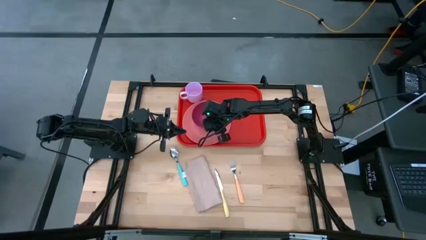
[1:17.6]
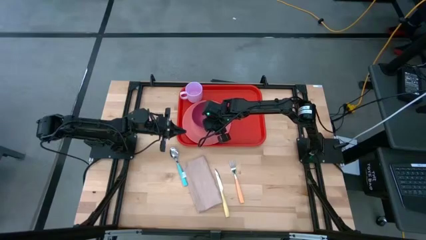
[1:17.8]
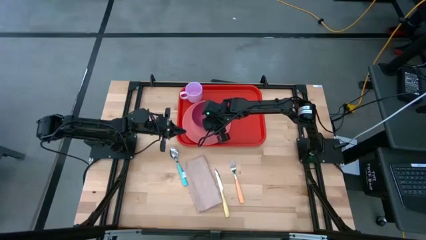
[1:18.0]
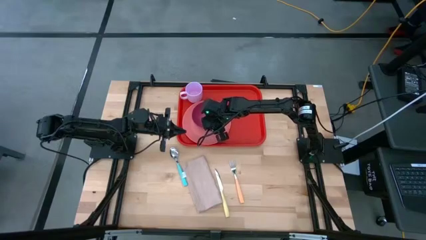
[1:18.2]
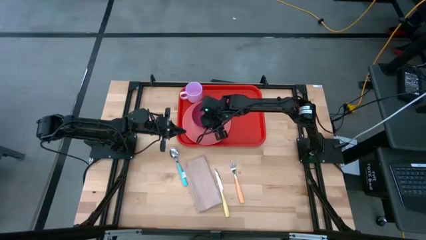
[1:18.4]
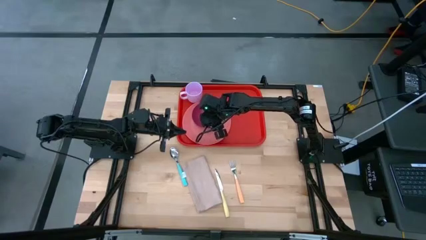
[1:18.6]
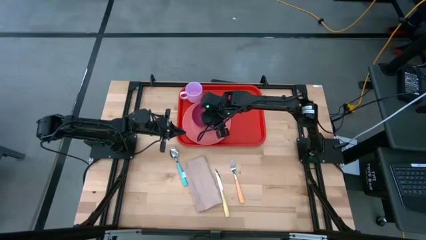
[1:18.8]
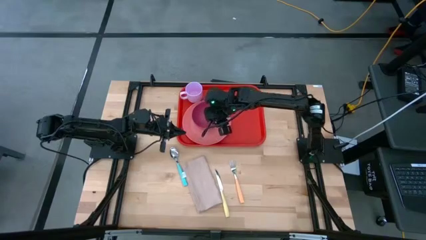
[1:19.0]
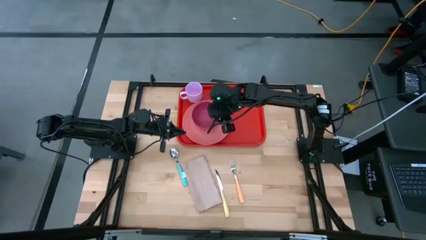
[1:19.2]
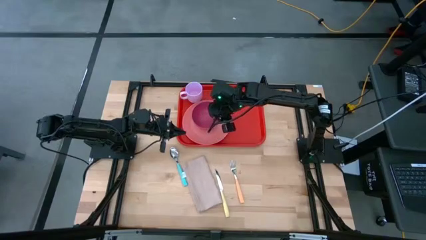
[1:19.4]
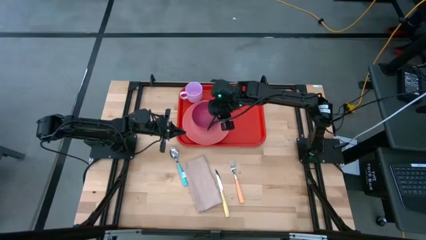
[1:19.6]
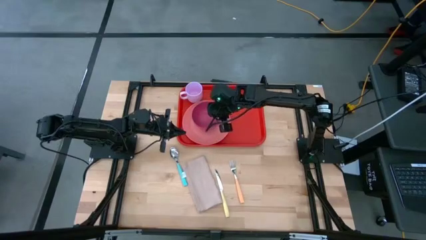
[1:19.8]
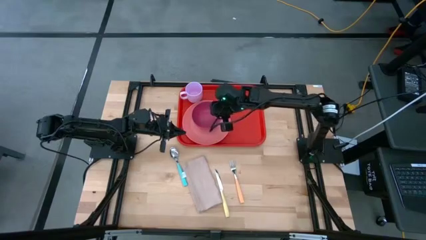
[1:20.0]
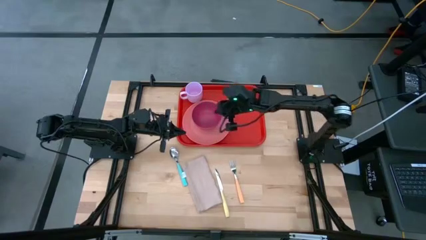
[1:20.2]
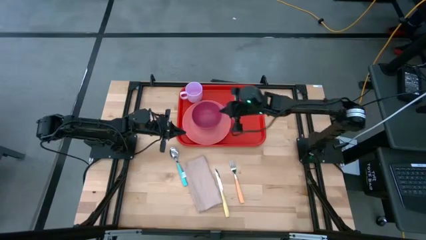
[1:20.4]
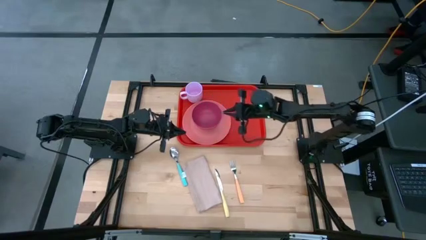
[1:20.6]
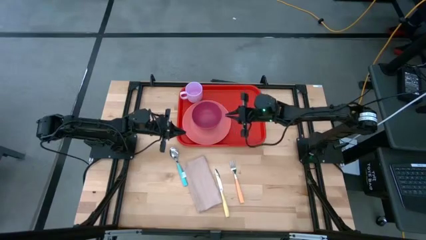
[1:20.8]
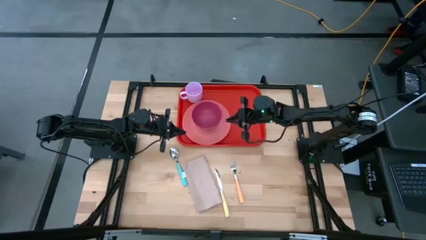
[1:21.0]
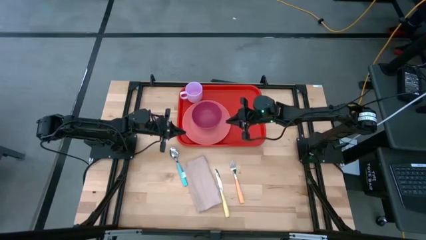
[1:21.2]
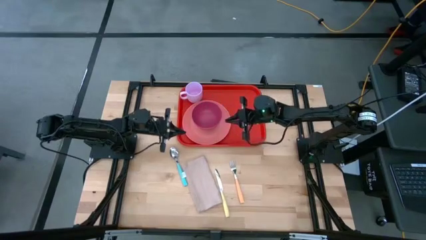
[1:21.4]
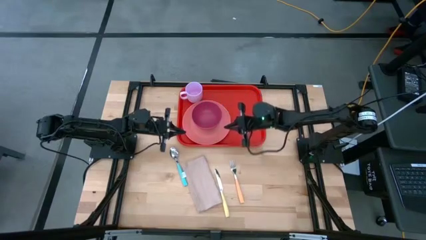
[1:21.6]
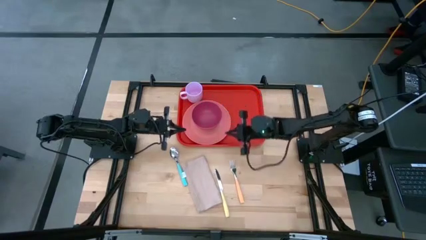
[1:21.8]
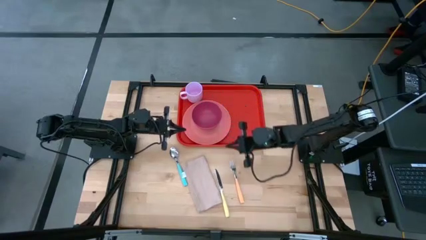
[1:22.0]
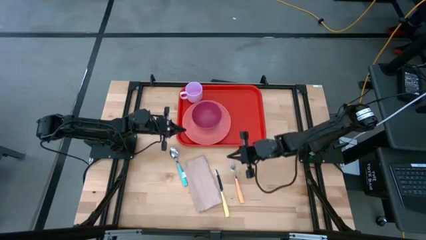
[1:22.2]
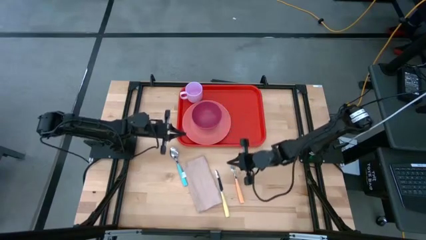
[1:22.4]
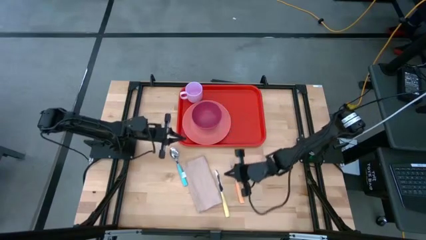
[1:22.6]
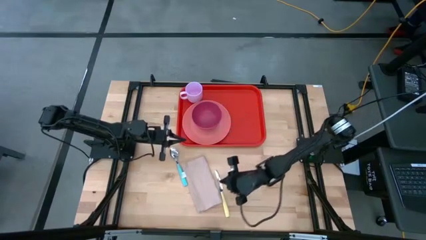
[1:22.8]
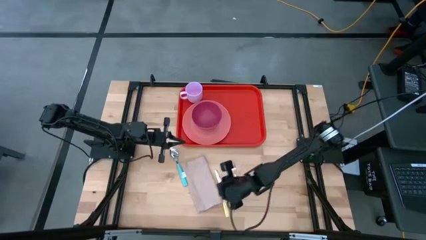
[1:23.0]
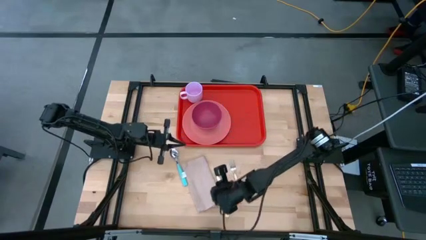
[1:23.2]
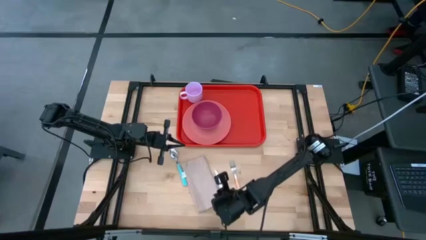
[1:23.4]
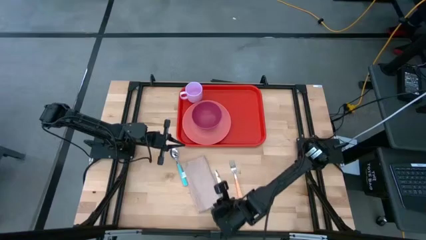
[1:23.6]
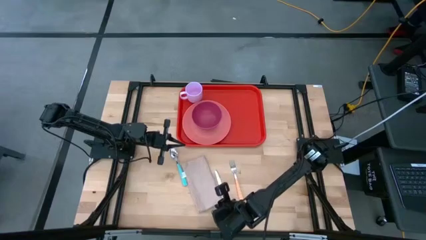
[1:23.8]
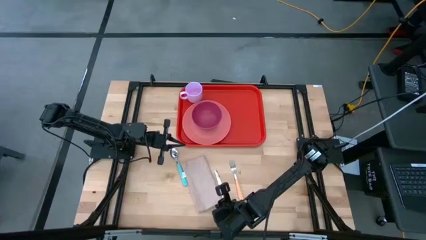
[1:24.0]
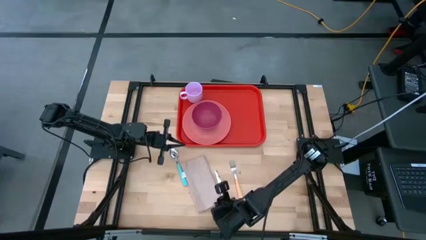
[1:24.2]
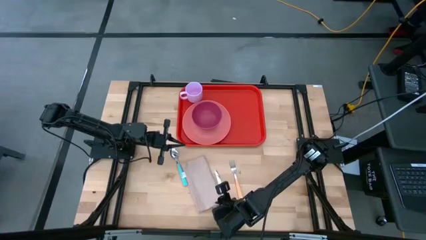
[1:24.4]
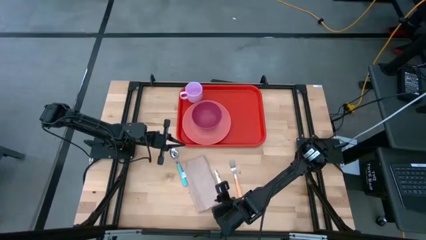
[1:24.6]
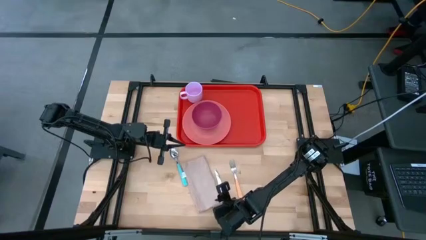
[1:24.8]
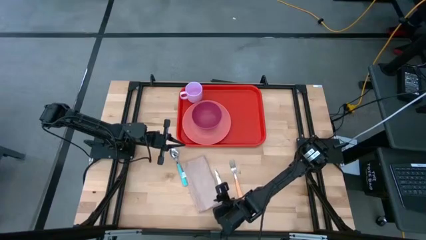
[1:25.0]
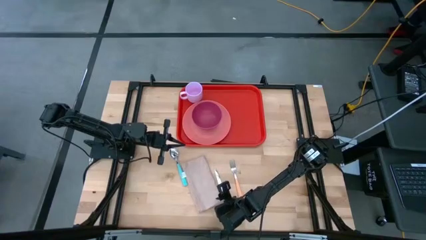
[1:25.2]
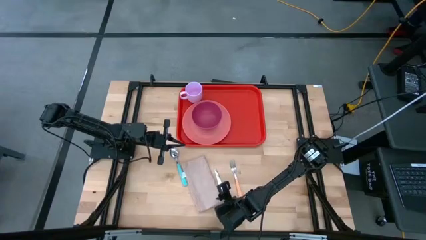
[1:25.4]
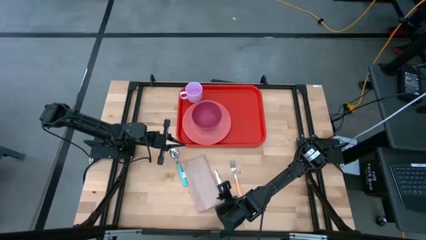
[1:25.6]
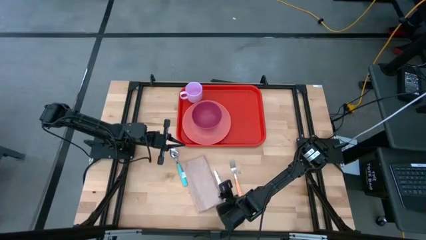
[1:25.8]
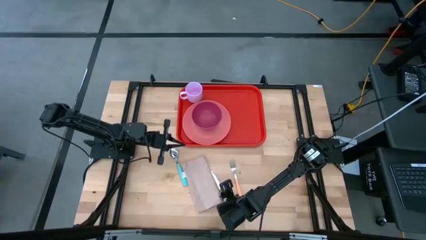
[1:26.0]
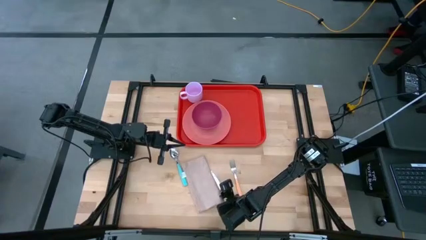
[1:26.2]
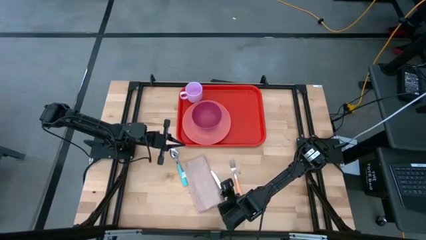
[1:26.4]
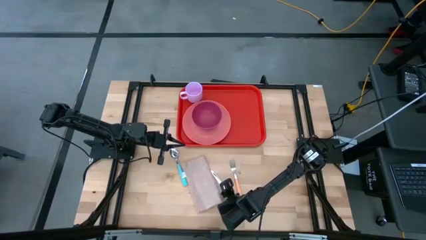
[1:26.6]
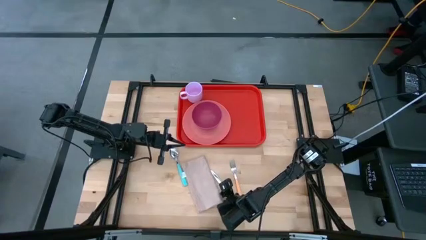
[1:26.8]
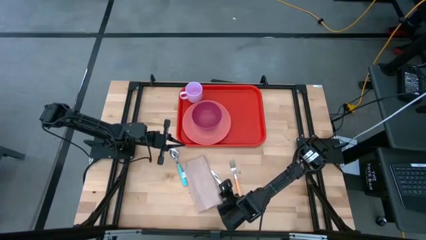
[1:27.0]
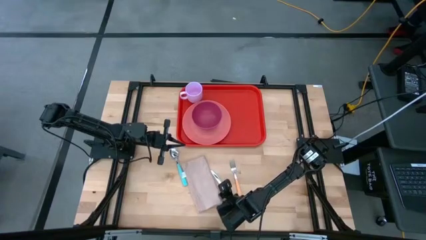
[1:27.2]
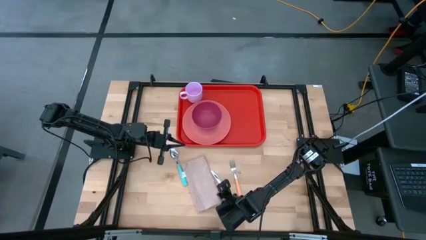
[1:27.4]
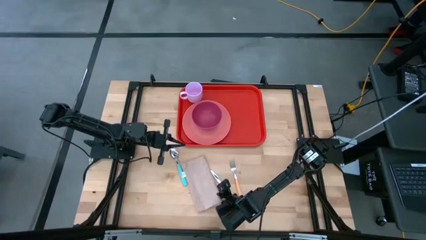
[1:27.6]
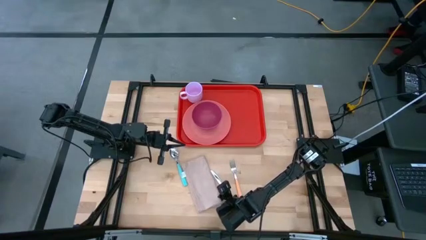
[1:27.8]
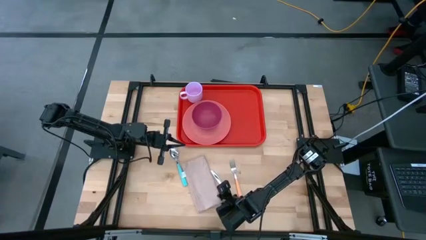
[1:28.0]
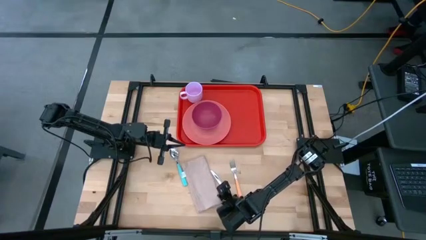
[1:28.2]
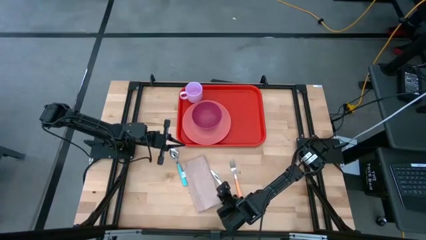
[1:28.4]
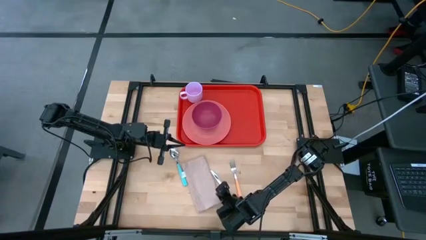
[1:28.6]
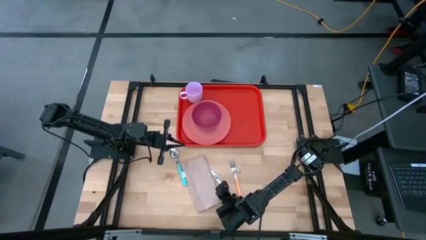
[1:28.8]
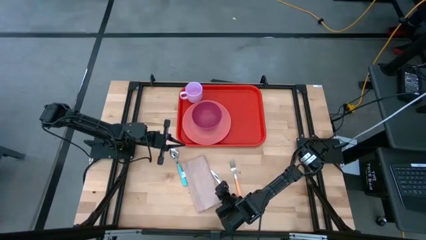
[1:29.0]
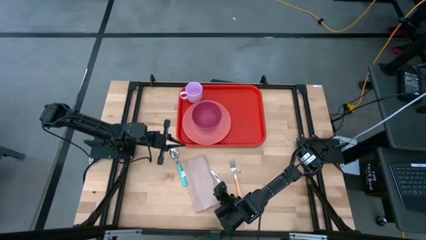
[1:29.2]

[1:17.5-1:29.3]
Task: Set up tray
Put the light brown table napkin to the right side of the plate on the tray
